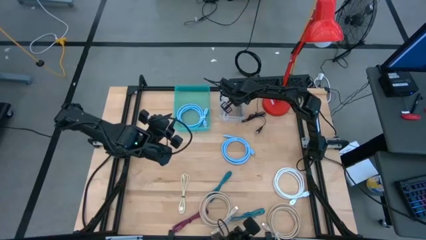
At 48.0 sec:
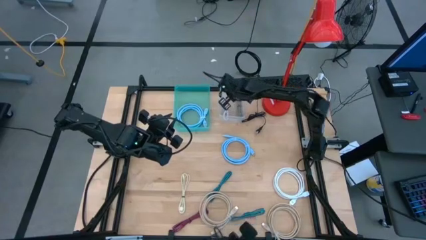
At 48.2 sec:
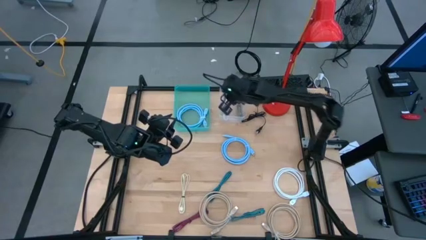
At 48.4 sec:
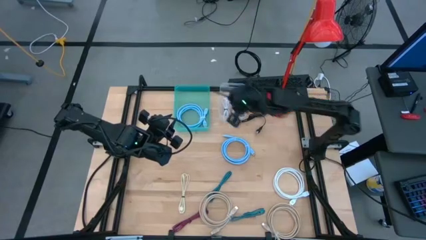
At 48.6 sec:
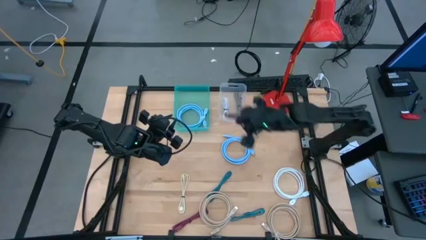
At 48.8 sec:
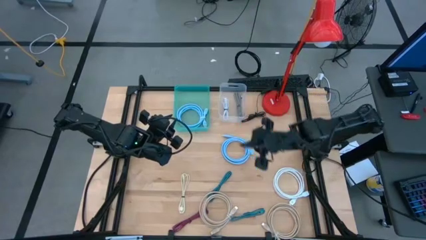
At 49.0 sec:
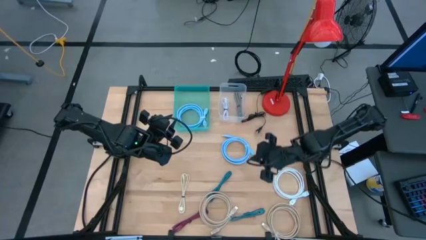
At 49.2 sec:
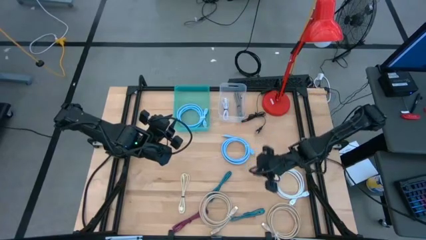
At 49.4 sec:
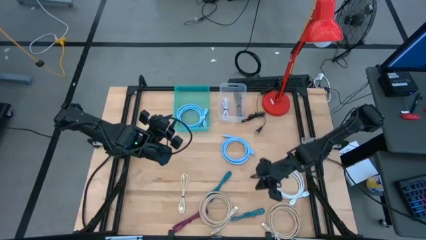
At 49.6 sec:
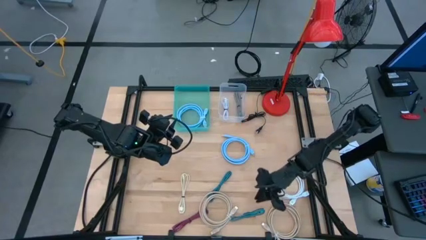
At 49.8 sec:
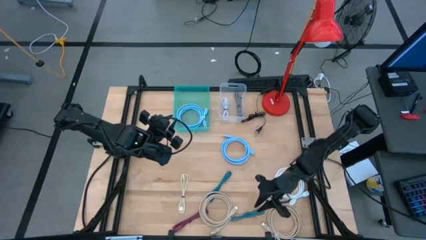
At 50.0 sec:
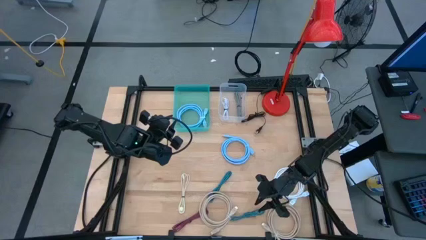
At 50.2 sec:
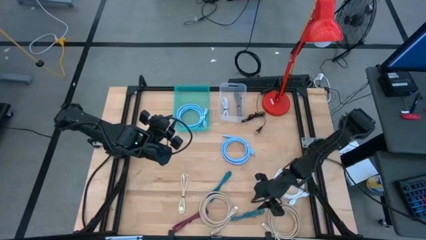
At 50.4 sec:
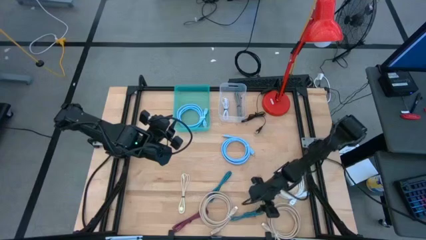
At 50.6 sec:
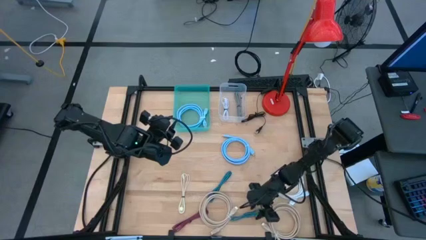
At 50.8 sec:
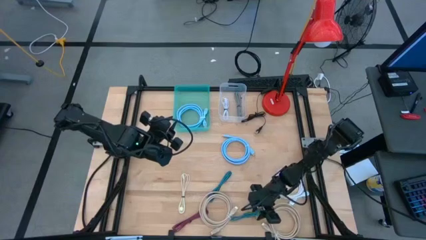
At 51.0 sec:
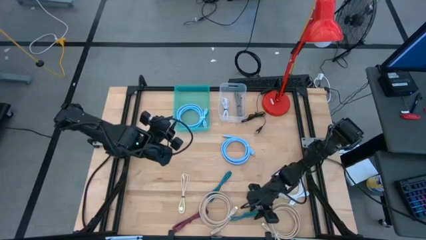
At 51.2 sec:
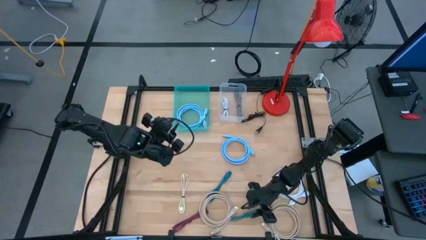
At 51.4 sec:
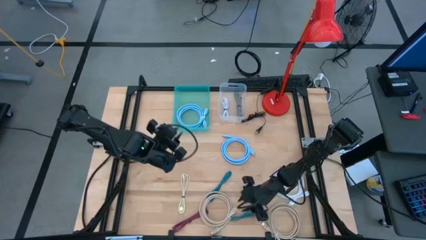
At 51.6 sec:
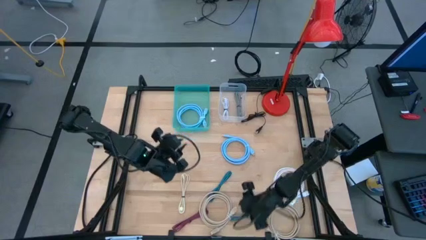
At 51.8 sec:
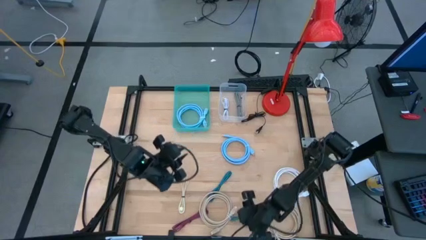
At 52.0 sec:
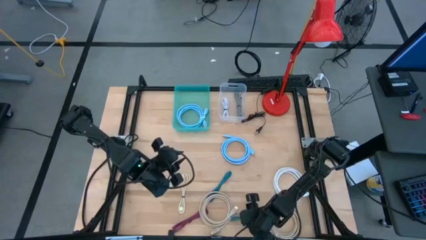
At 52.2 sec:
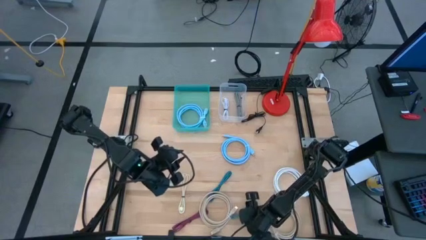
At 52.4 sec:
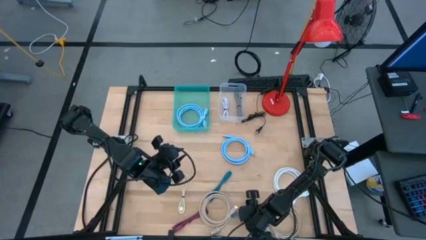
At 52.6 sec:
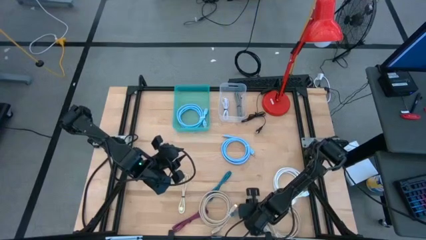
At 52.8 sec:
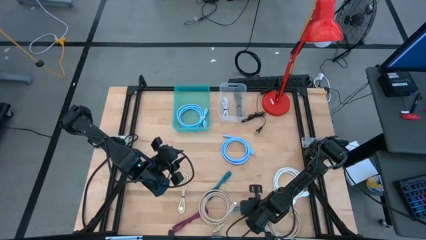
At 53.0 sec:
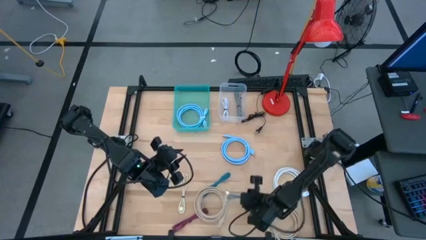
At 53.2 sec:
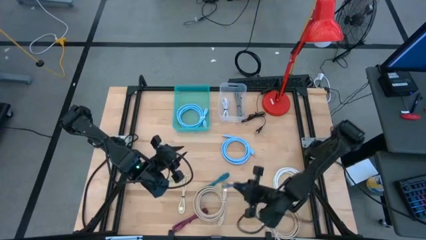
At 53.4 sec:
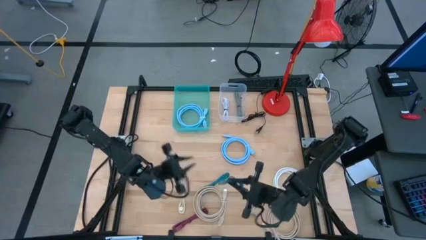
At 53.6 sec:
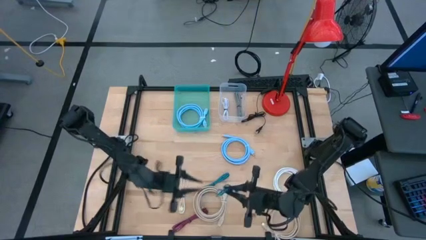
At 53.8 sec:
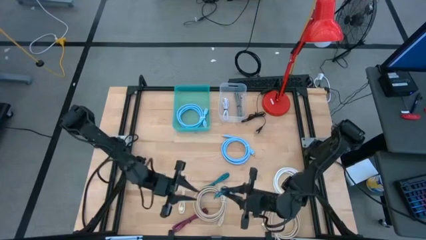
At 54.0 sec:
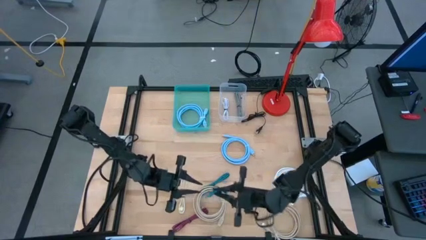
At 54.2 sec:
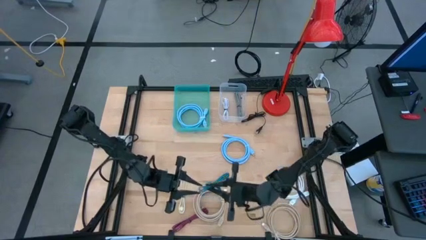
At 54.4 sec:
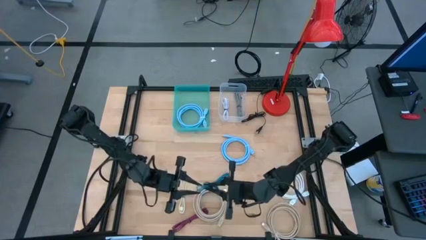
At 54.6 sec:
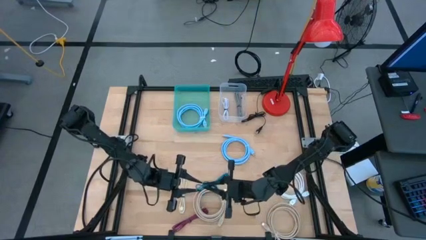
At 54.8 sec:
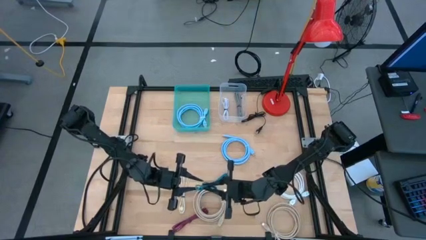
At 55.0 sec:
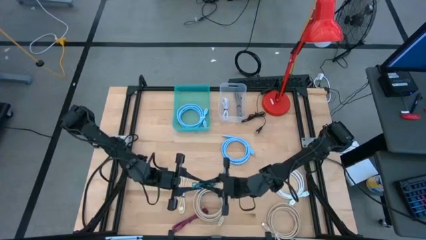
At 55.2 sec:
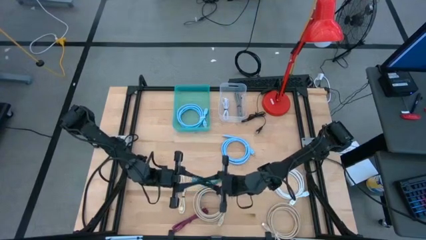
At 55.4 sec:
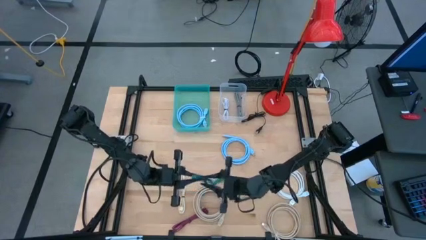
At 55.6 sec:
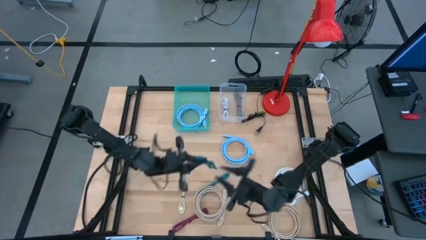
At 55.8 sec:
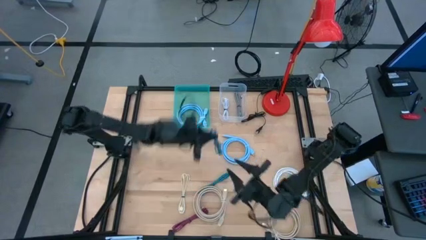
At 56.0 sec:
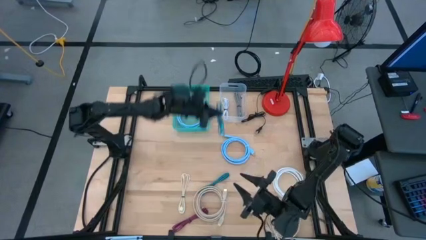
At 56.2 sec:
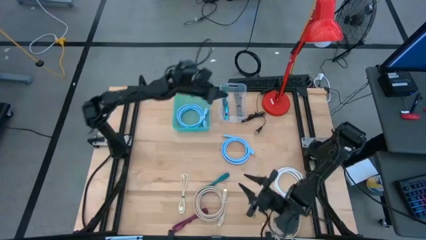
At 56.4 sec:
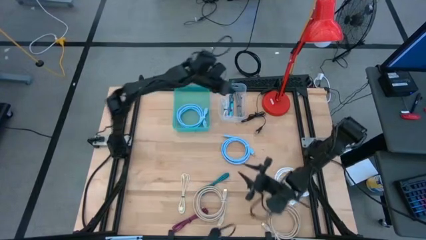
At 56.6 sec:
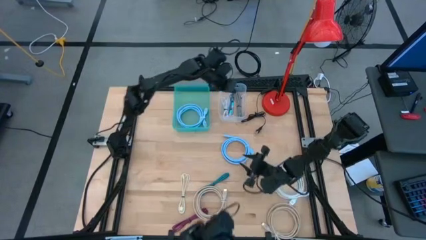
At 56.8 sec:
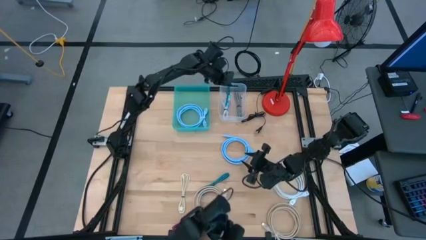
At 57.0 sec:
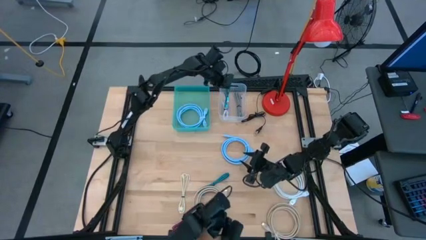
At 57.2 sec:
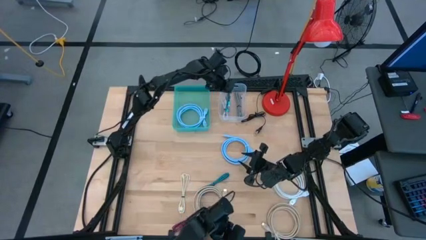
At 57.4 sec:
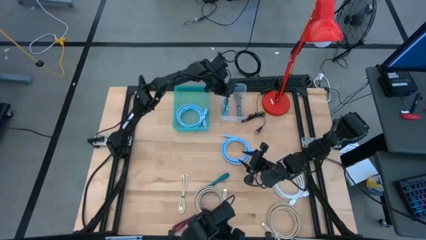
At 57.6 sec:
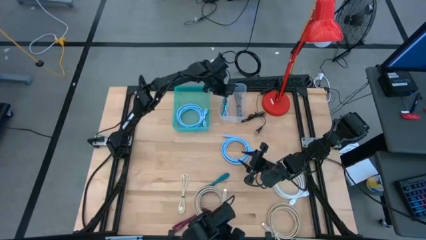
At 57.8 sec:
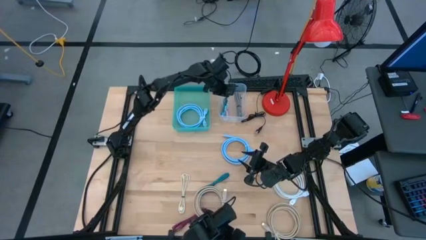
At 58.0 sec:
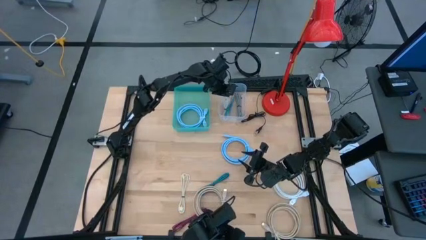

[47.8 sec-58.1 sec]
Task: Pick and place items into bin
Put the bottom black blue charger cable into the transparent bin

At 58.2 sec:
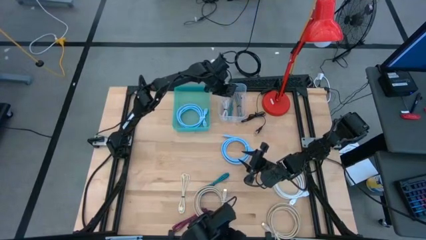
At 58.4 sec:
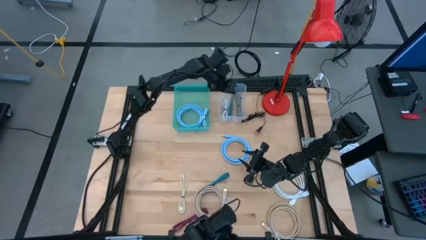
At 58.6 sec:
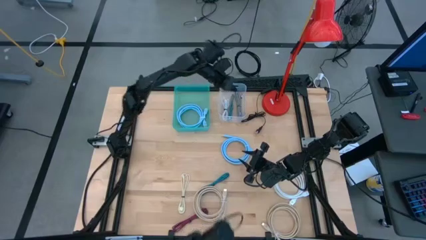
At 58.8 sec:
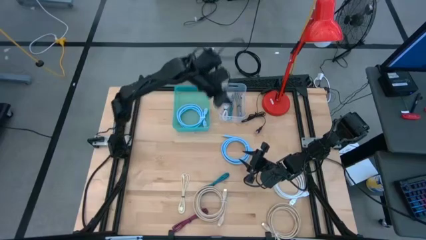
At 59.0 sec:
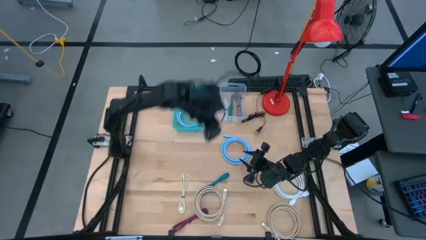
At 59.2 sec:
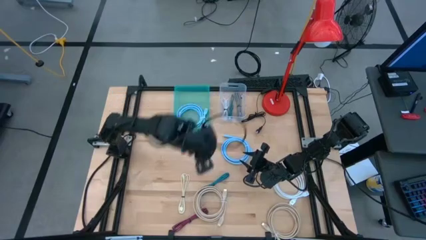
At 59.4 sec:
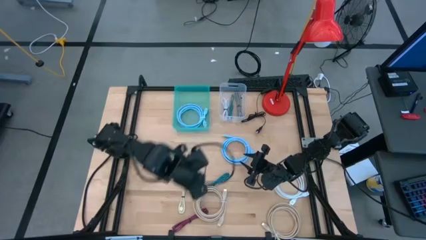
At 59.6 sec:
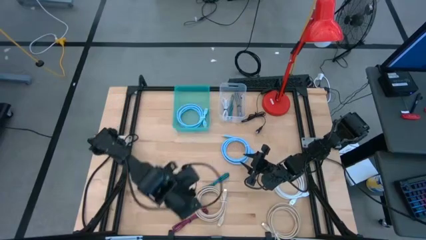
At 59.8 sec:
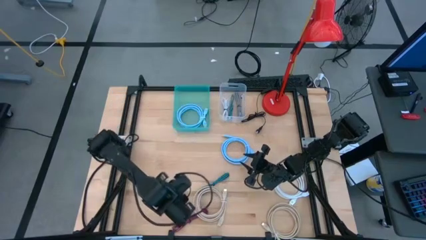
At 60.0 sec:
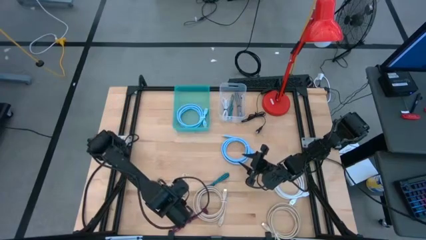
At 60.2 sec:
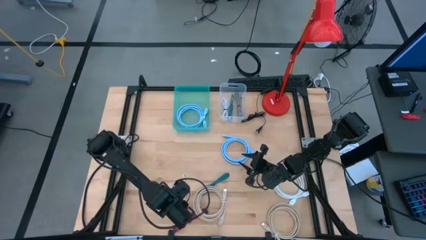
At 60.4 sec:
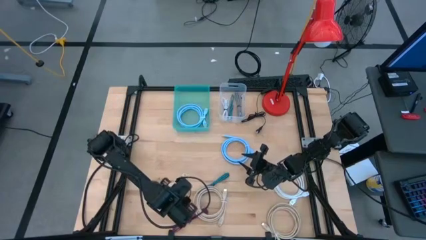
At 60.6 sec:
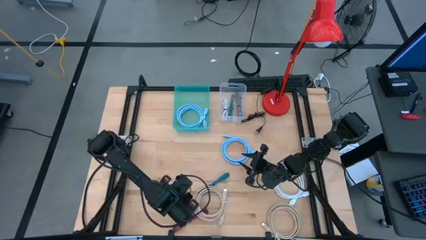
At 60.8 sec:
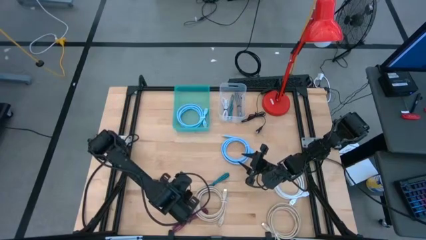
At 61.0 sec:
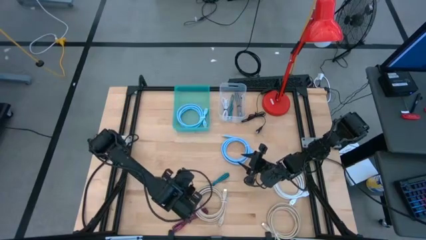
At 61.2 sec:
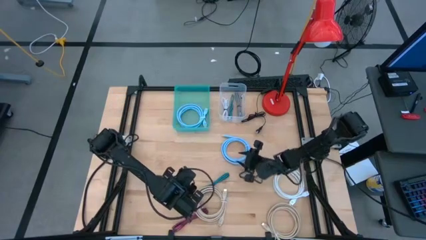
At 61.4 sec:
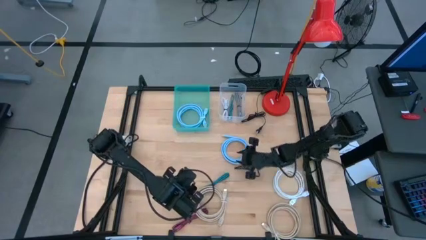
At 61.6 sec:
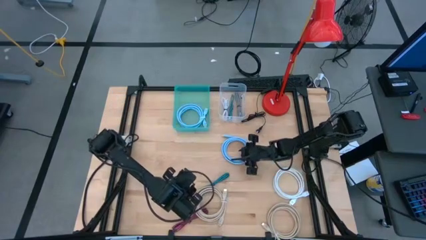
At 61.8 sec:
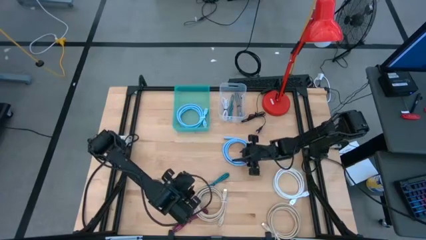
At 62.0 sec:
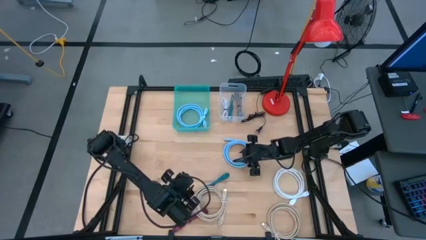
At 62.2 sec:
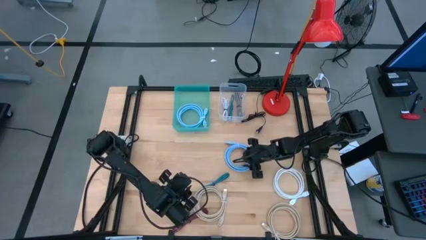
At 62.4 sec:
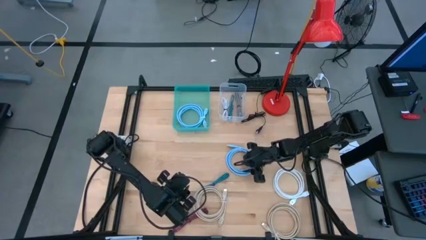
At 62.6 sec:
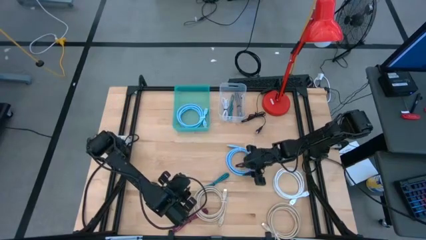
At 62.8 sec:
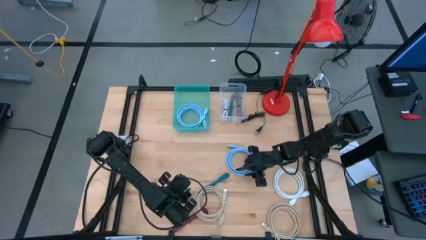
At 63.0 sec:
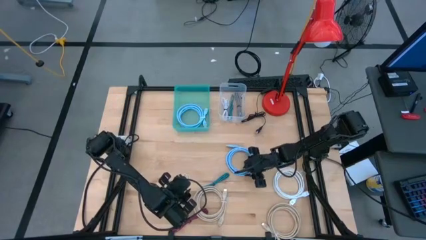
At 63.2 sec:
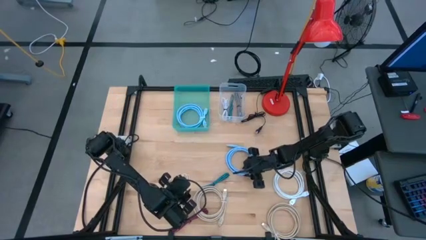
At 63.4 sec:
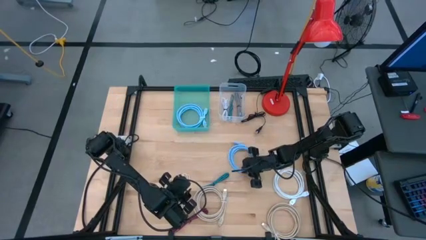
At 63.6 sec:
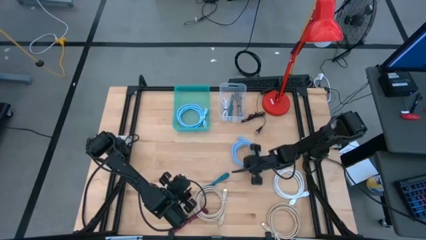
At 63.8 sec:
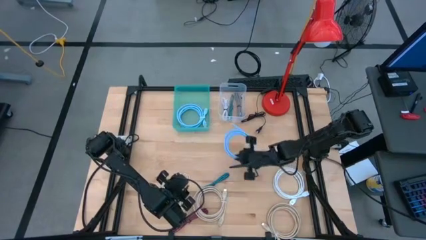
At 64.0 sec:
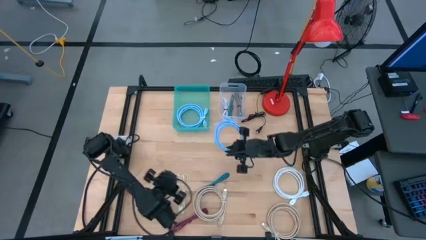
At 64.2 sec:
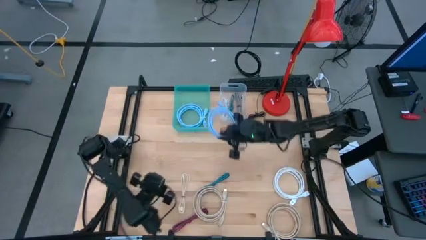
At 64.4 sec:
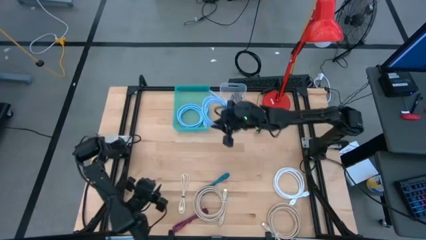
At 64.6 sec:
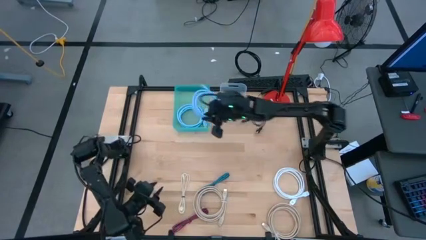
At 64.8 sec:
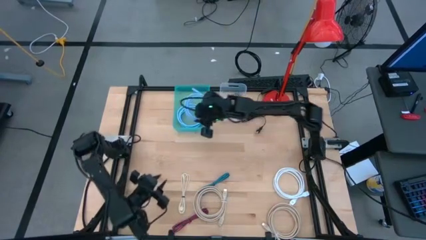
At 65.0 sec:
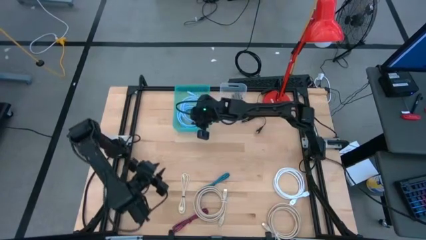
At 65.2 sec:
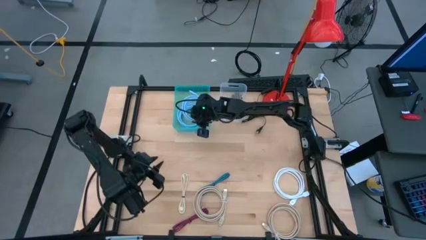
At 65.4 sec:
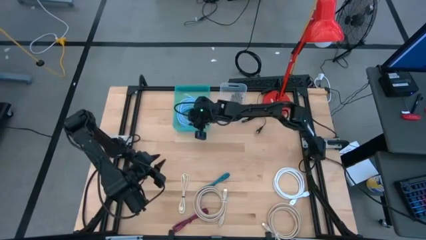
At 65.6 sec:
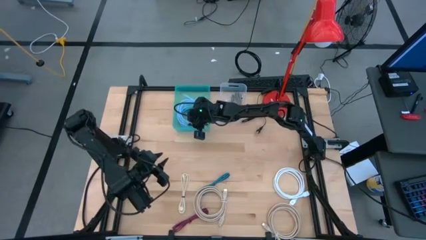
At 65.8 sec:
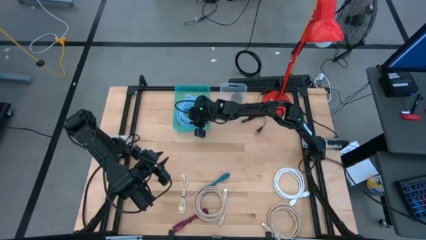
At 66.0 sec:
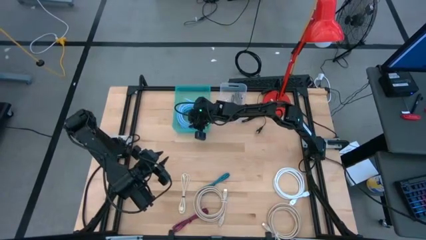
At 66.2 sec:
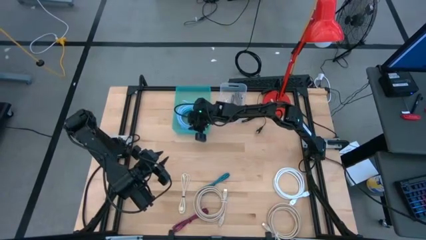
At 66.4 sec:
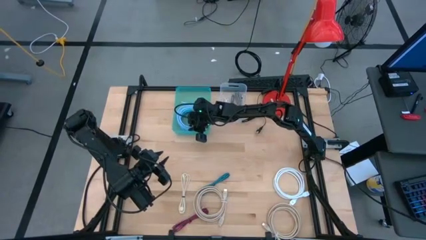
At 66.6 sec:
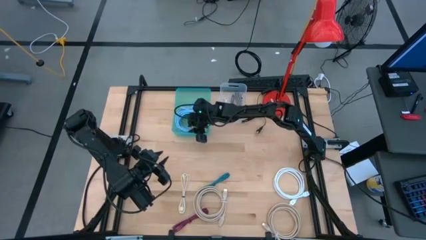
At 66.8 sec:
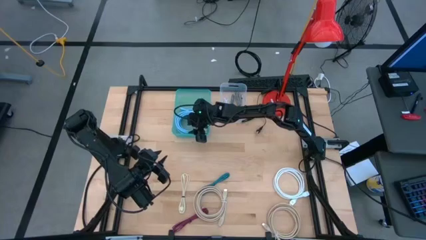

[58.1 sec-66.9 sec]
Put the blue HDMI cable into the green bin
